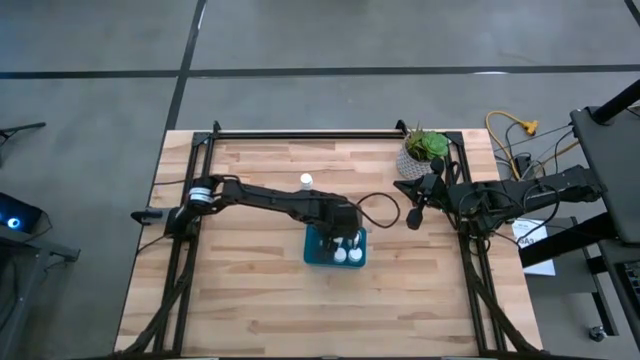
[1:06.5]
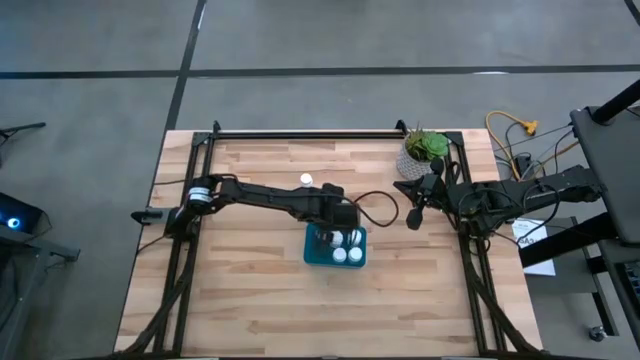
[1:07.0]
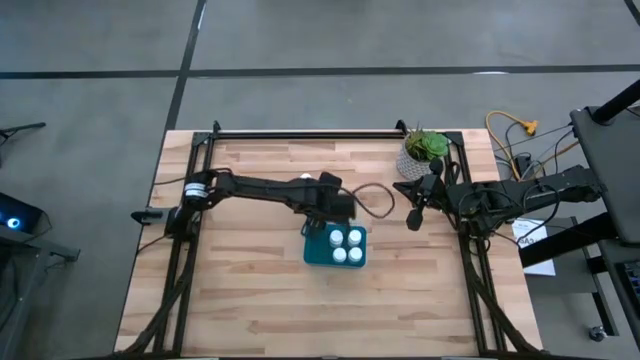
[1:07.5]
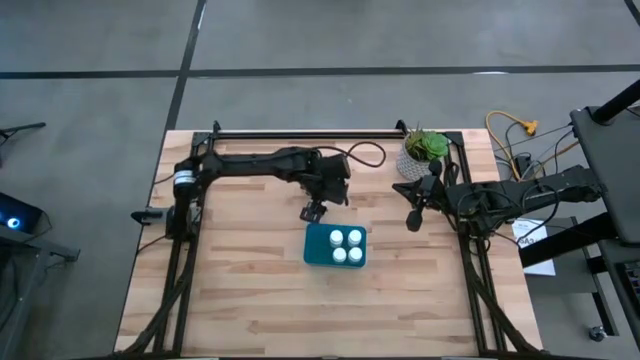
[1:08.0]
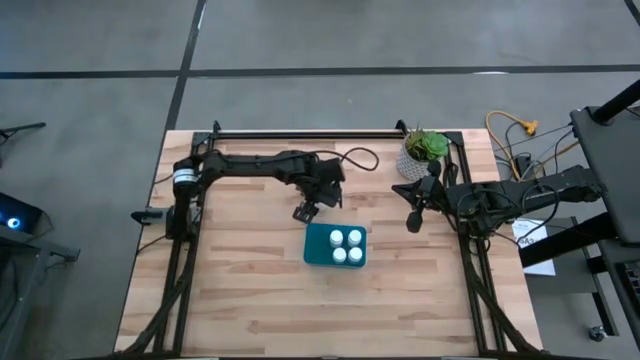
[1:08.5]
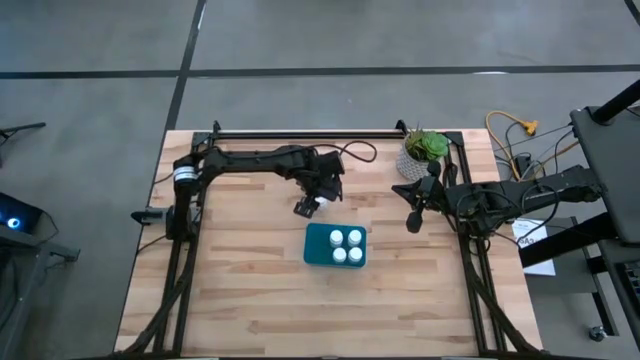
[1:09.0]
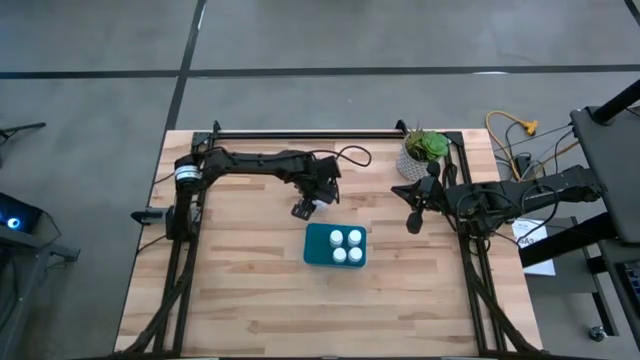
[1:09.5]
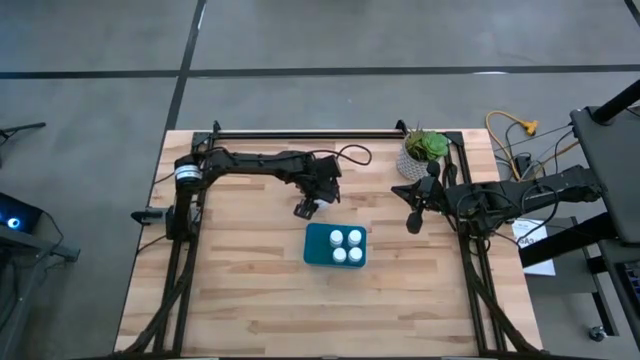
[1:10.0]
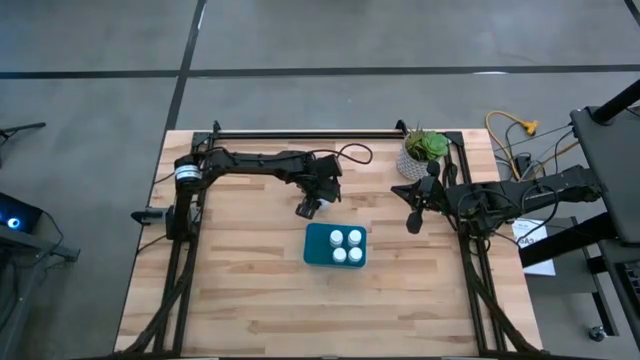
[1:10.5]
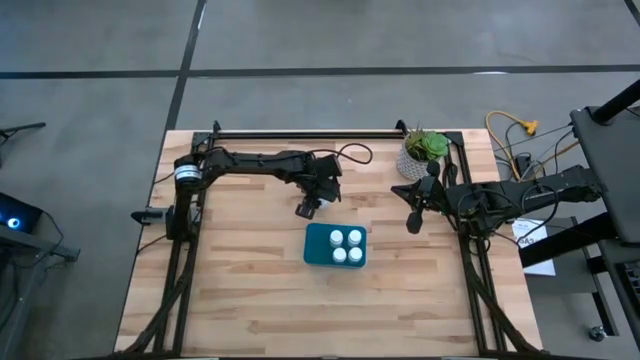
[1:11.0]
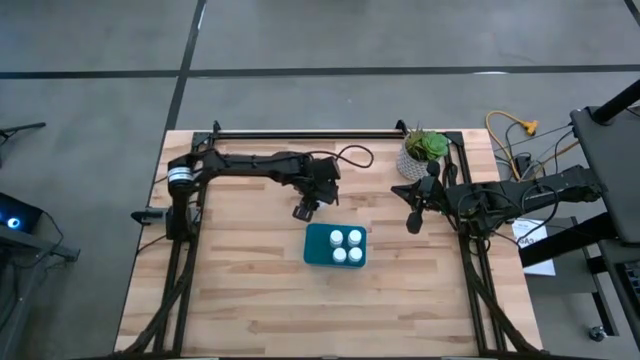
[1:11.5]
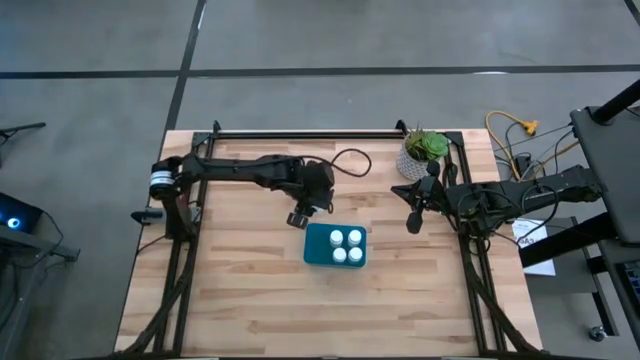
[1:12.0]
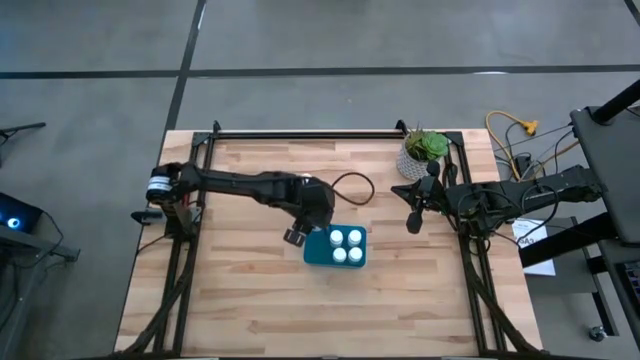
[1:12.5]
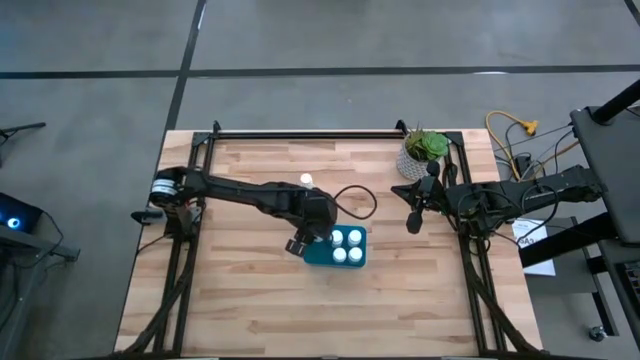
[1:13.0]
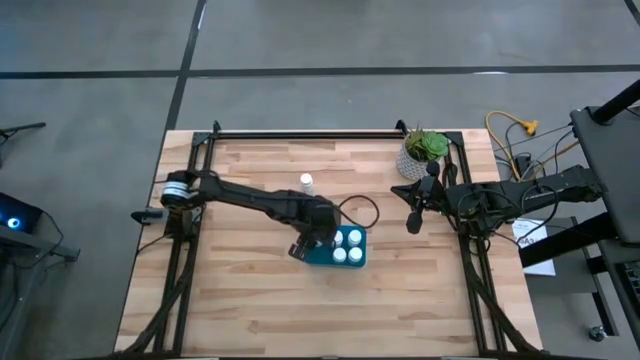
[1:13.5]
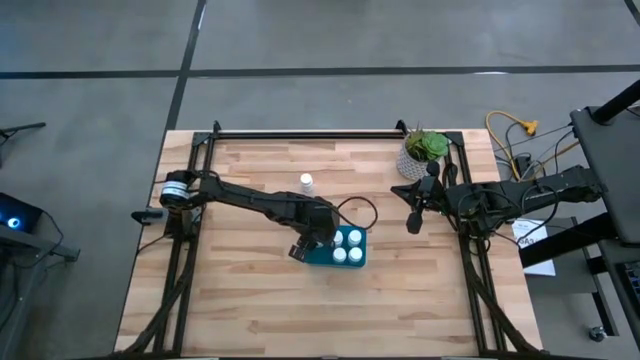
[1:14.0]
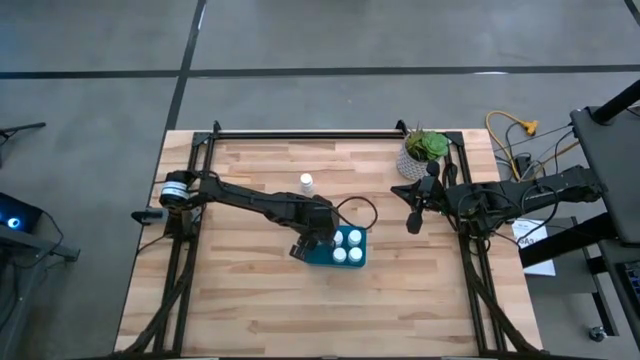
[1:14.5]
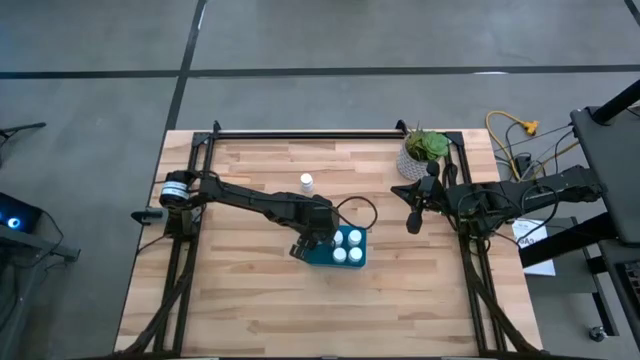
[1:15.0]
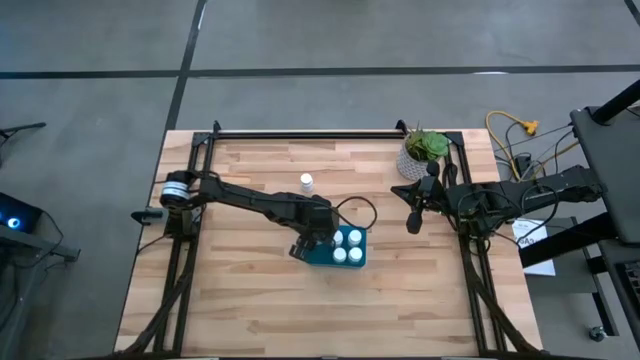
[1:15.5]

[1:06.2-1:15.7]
Task: Pick and place pill bottles into a basket
Put the white pill bottle into the blue bin

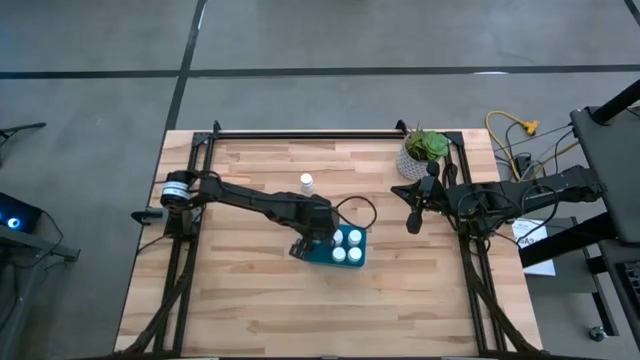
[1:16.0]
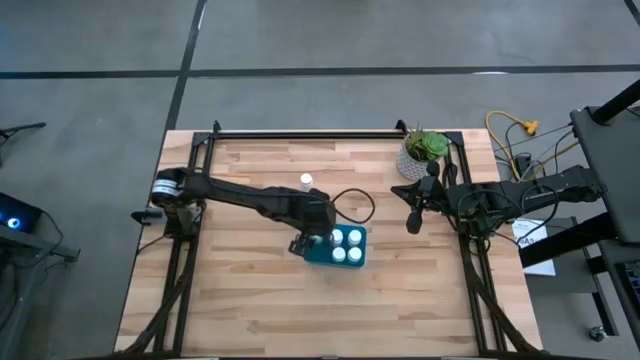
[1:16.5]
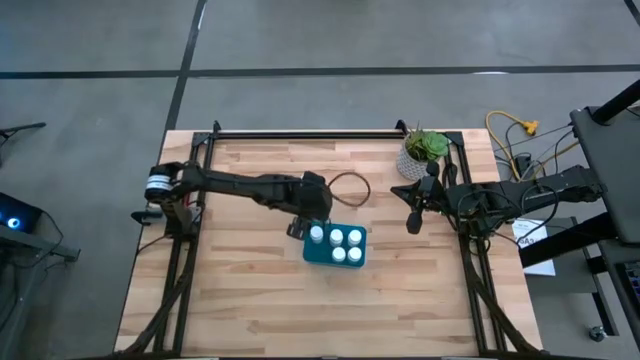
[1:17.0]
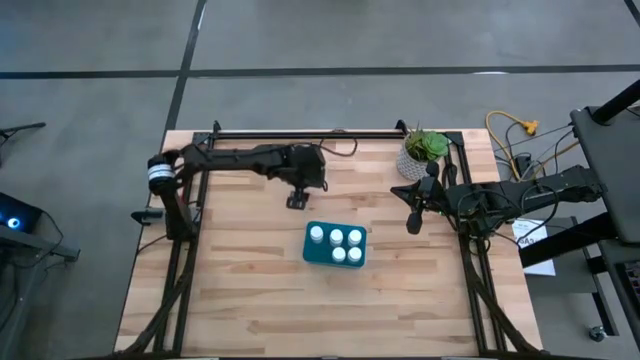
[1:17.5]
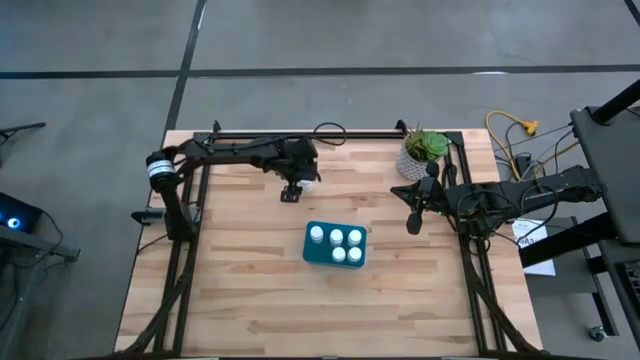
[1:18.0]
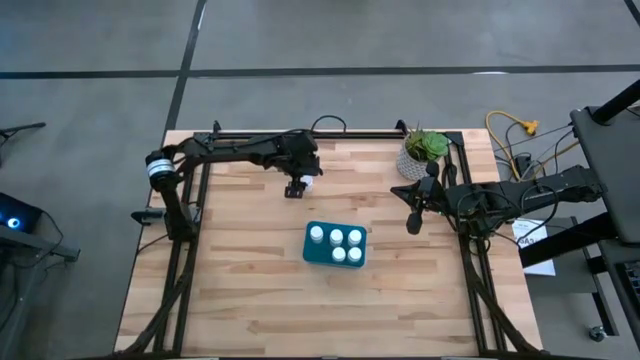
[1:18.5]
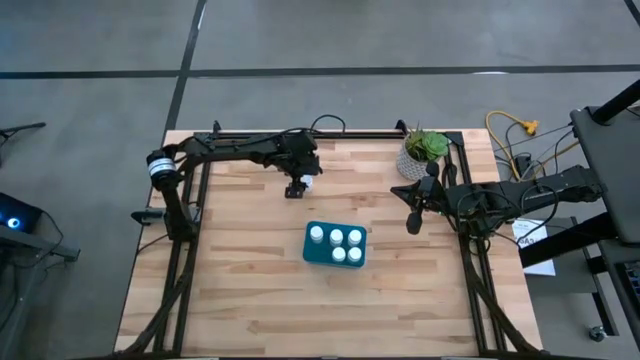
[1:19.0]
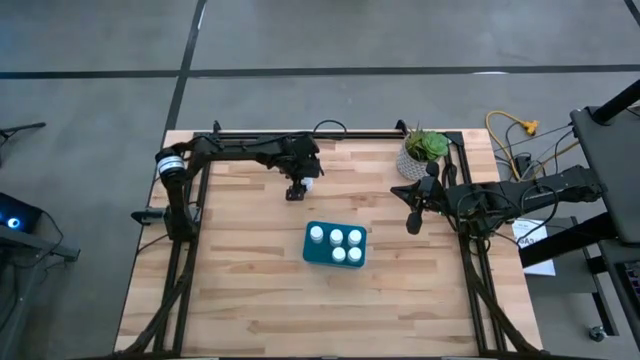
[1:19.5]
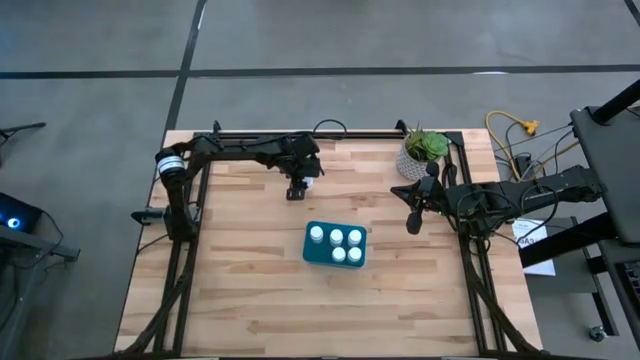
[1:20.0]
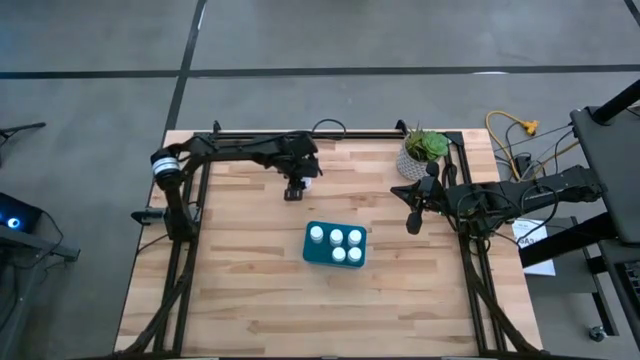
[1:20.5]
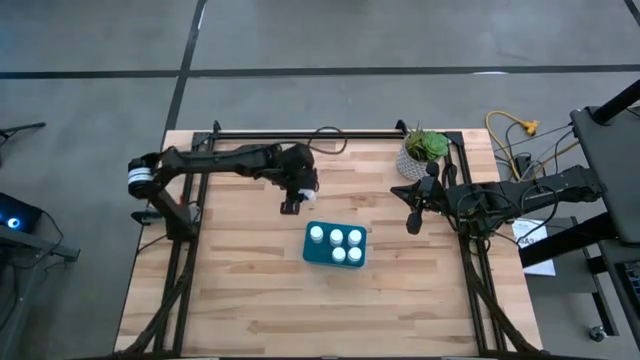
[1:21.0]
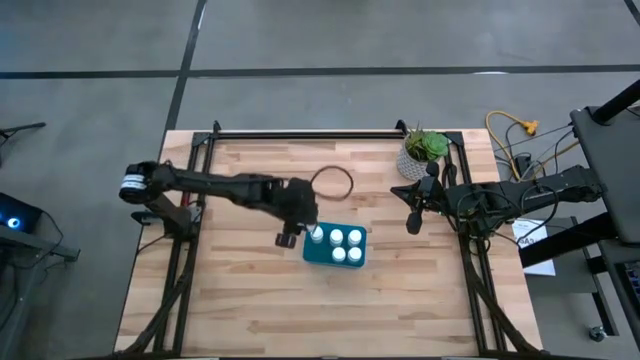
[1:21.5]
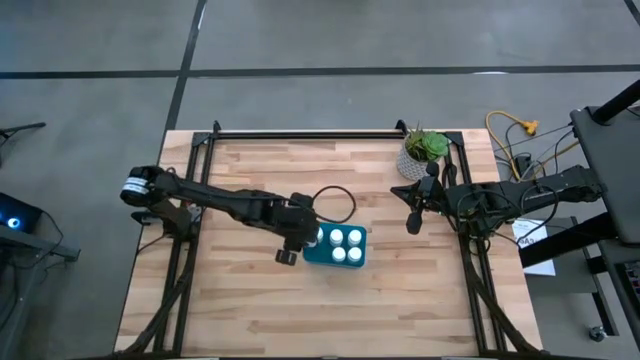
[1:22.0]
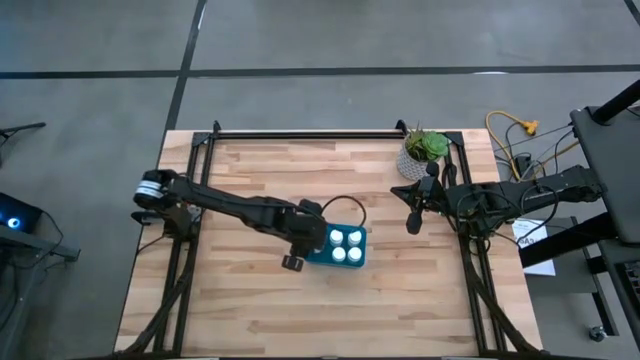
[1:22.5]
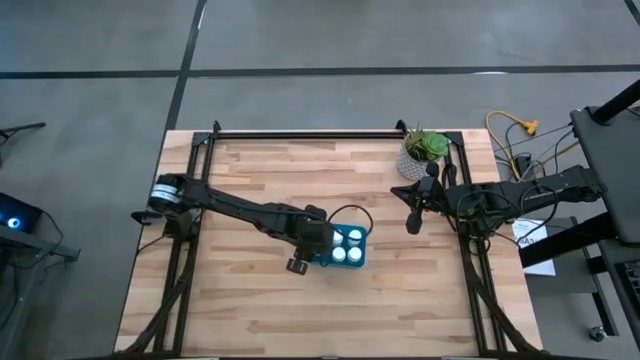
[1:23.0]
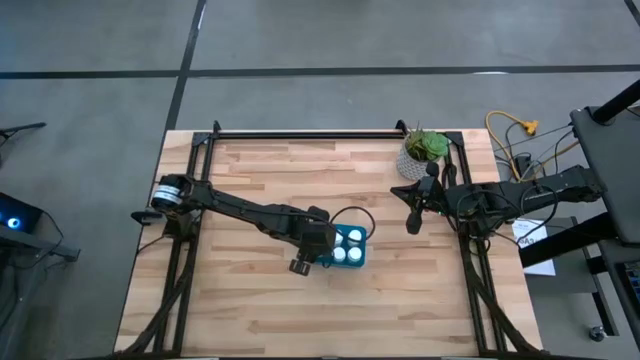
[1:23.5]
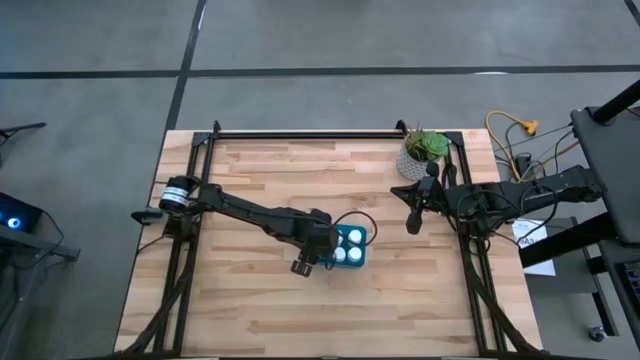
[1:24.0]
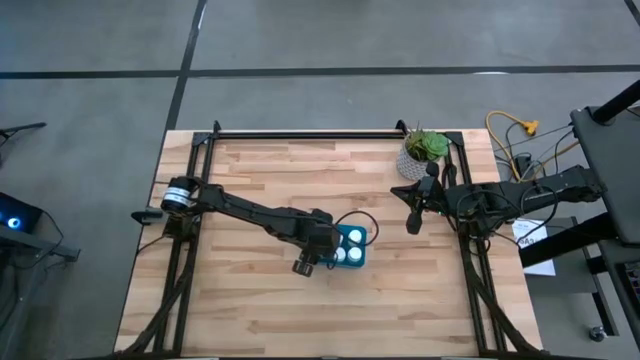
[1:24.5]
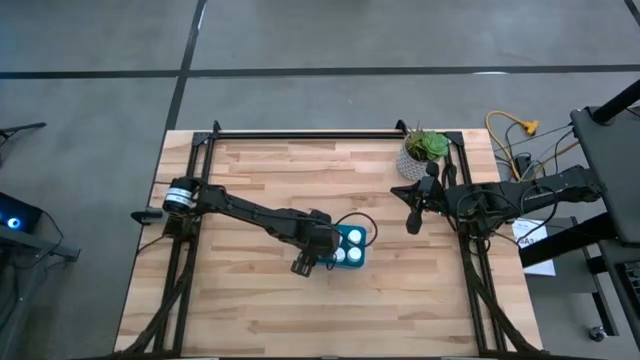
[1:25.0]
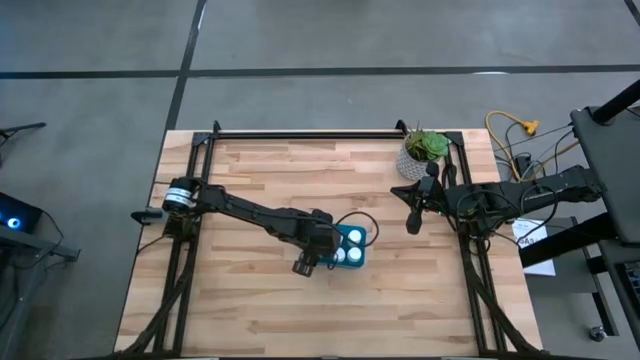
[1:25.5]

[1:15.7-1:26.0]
Put the white pill bottle into the blue bin
